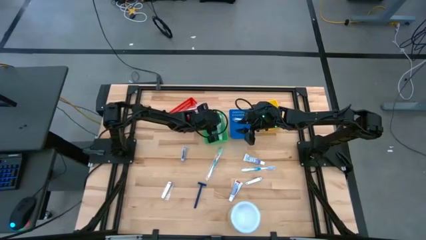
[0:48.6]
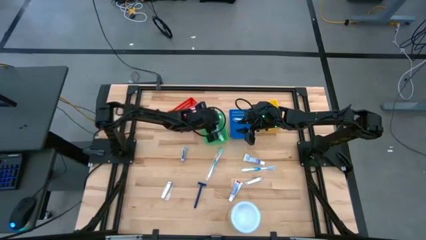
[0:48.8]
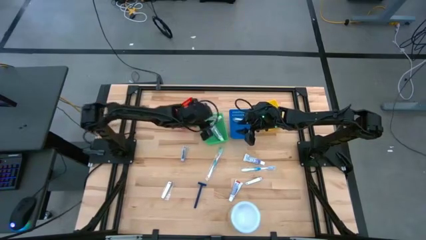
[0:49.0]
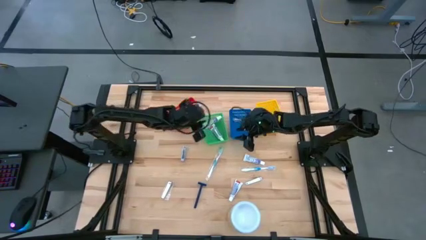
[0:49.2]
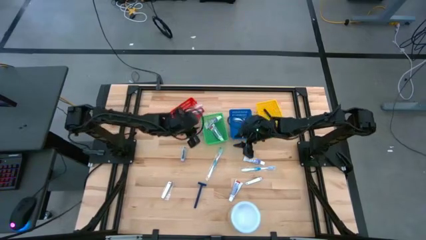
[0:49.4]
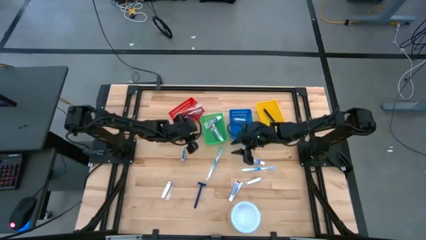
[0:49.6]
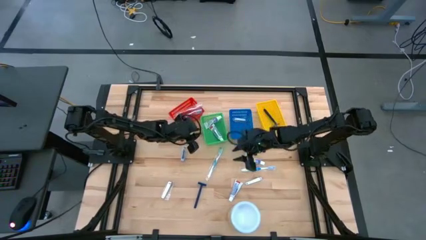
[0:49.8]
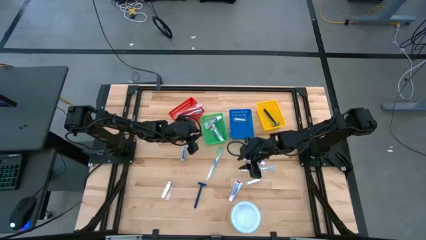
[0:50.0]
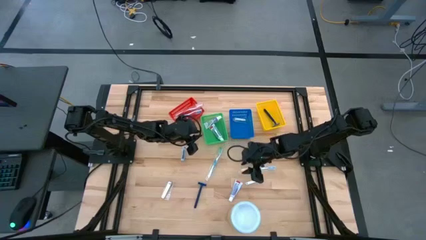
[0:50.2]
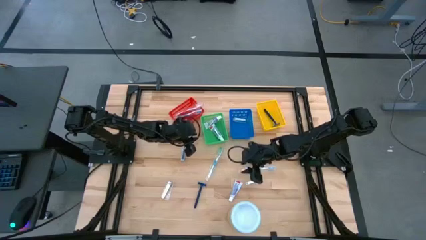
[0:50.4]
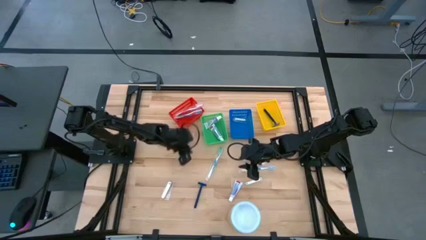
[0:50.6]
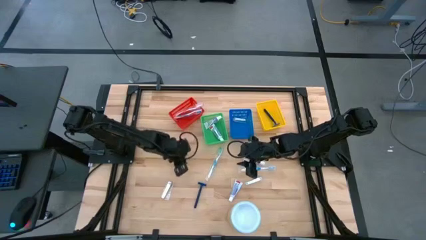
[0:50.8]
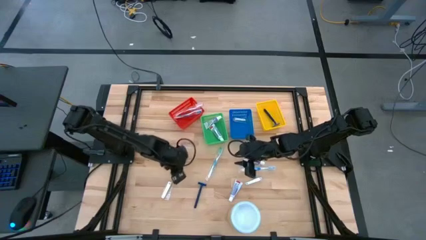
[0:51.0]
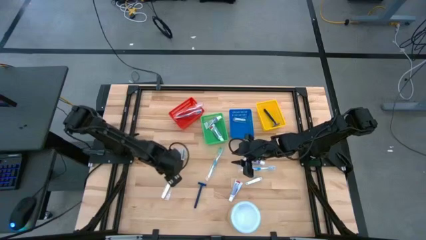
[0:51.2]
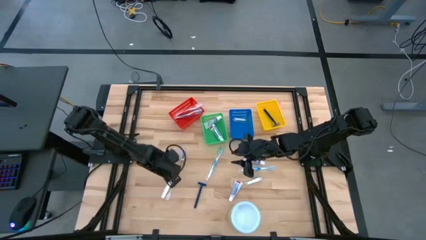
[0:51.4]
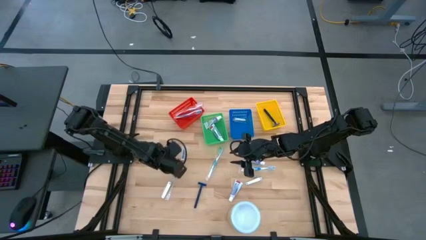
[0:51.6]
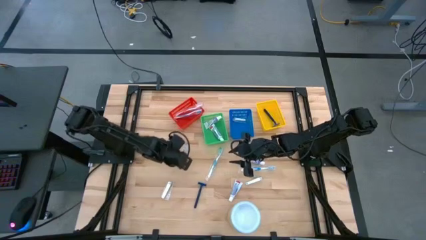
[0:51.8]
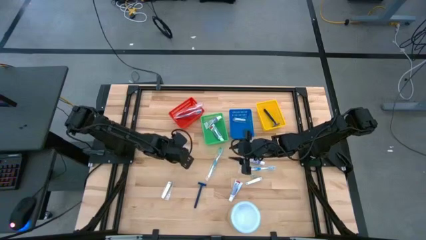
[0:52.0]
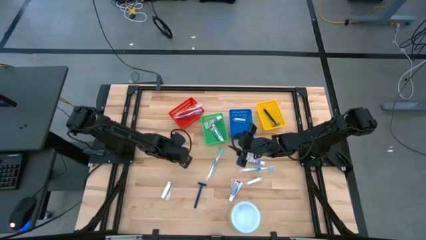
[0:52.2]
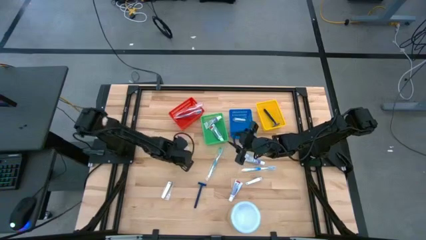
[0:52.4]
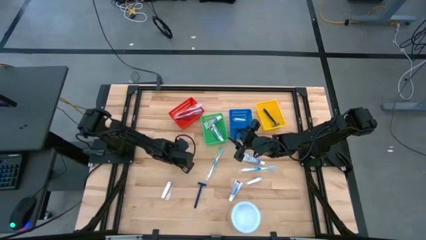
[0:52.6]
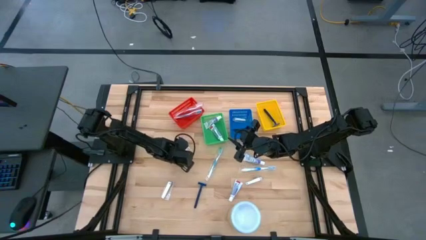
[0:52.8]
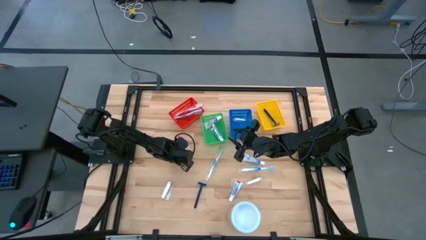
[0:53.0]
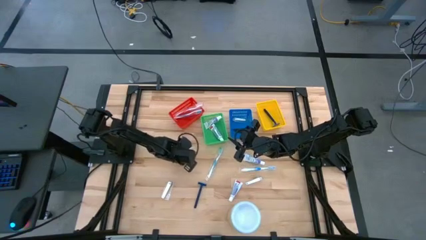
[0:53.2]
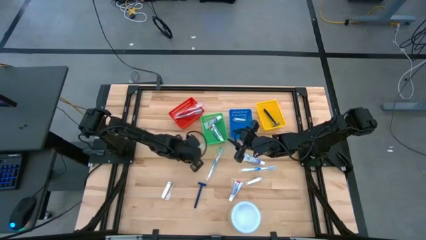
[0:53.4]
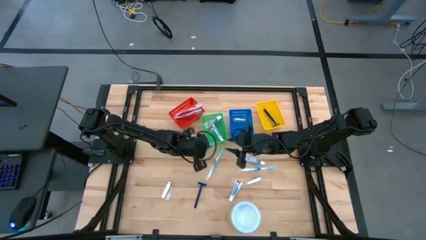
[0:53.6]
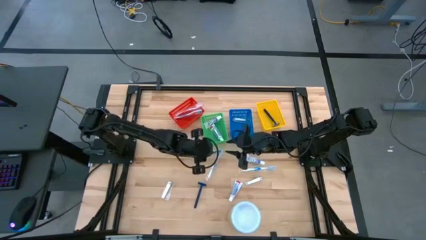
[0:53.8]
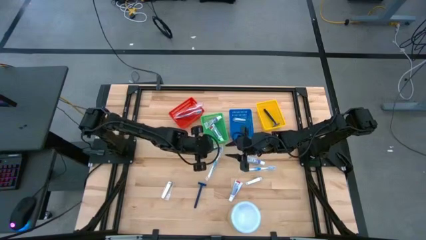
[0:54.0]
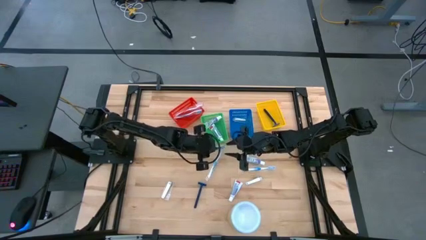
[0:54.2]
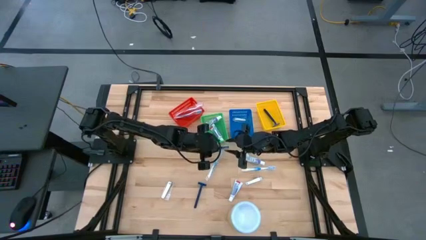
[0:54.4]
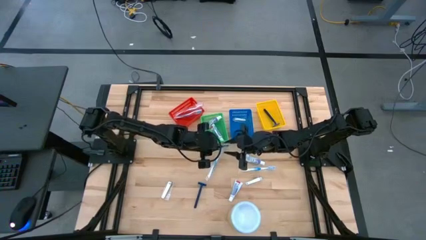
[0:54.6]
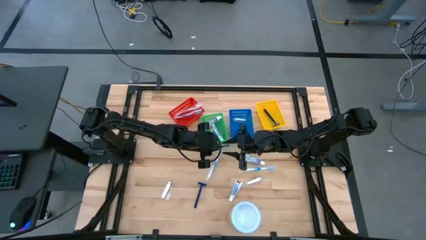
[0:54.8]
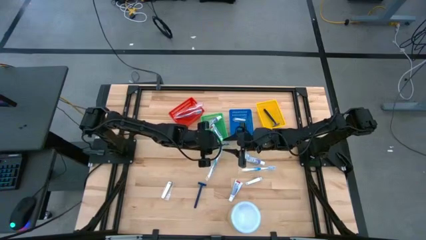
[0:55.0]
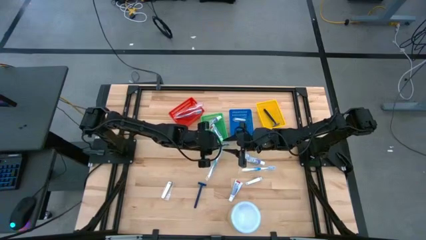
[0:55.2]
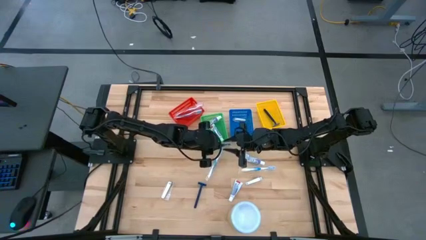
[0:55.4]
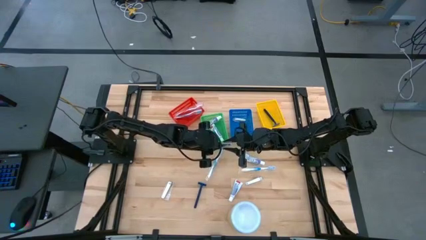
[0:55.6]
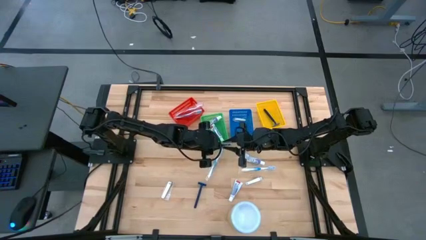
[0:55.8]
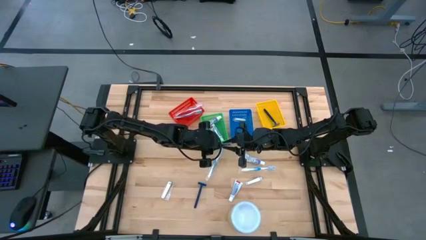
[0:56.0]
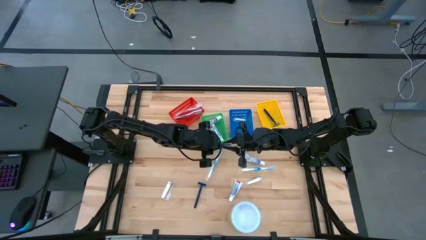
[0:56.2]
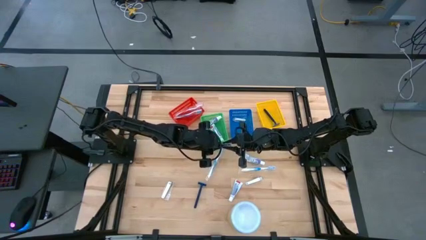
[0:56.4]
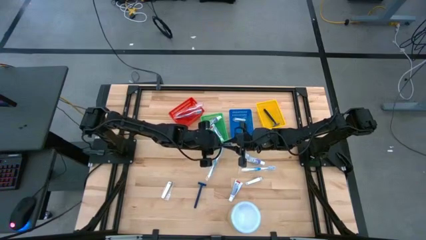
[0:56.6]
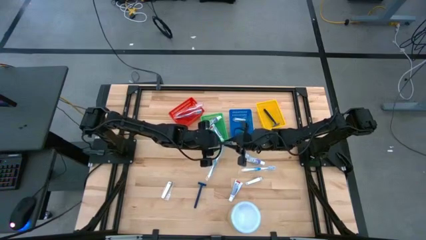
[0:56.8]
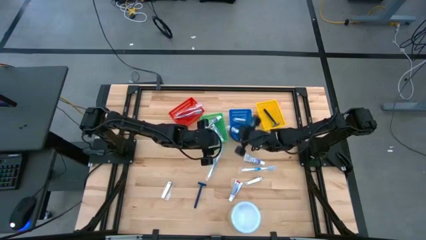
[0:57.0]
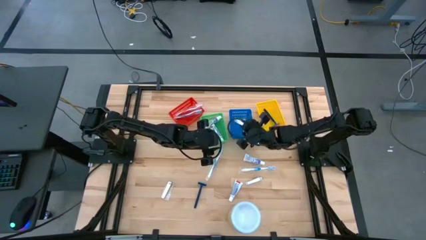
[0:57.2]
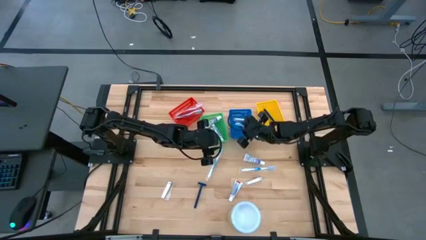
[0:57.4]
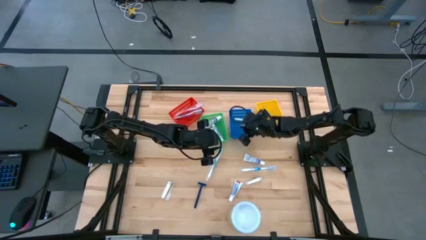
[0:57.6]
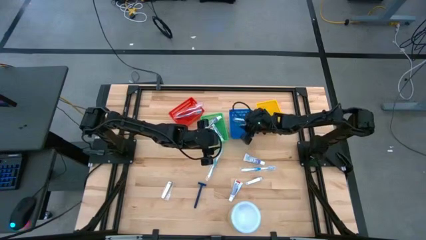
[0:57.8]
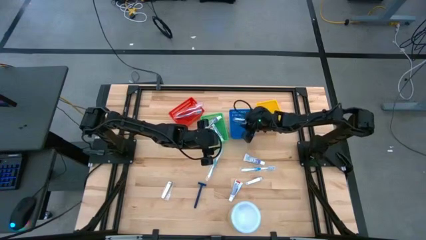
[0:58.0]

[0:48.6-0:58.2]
Task: Pick & Place Travel size toiletries
Put the silver nail cutter into the blue bin

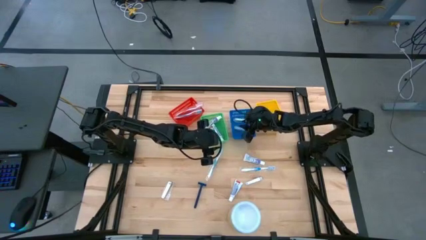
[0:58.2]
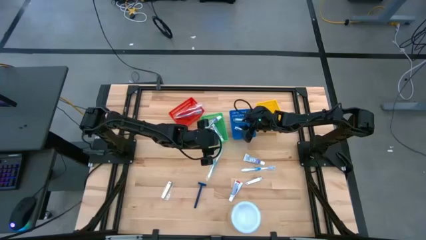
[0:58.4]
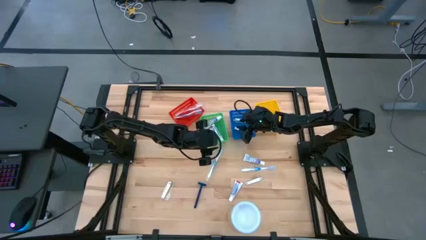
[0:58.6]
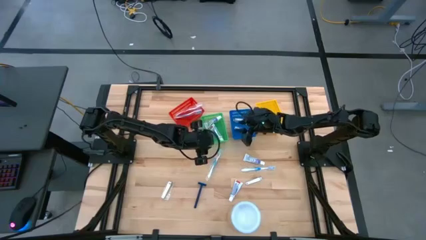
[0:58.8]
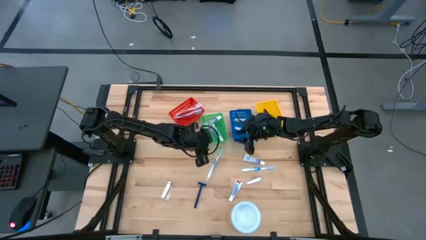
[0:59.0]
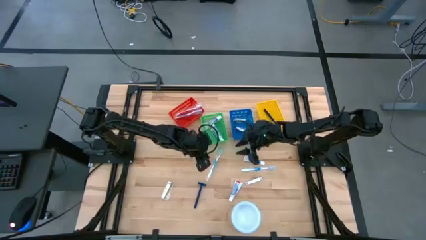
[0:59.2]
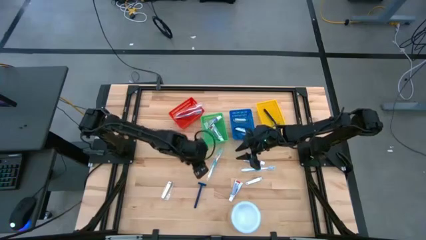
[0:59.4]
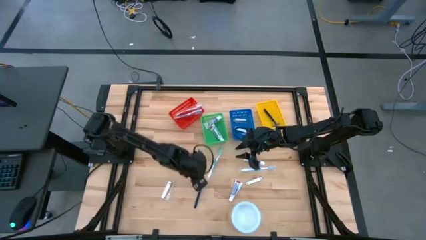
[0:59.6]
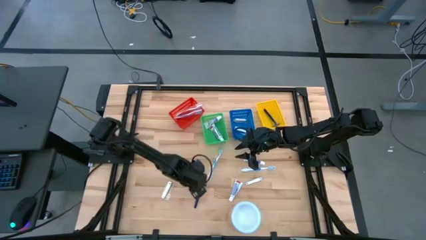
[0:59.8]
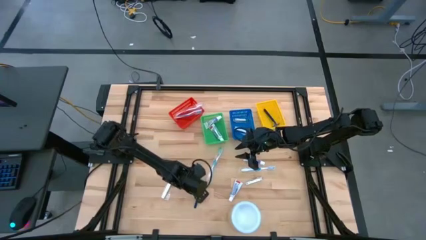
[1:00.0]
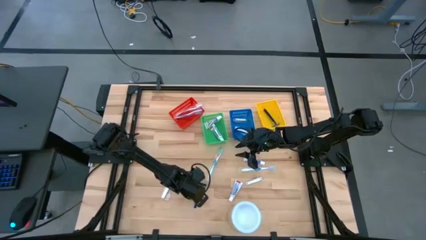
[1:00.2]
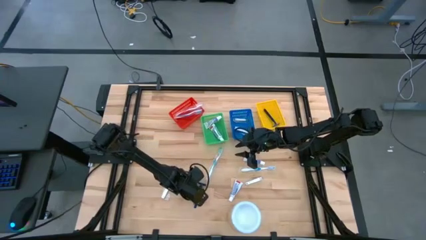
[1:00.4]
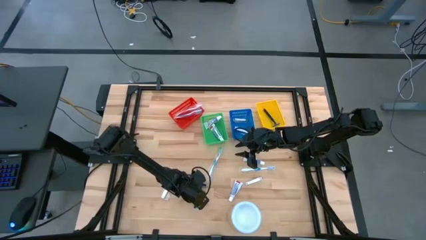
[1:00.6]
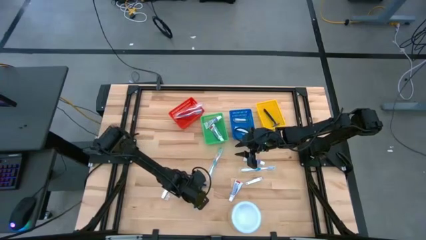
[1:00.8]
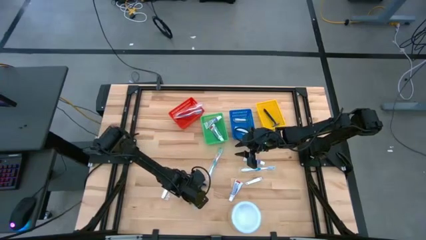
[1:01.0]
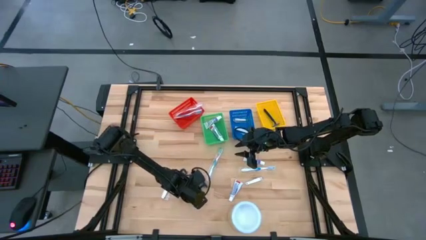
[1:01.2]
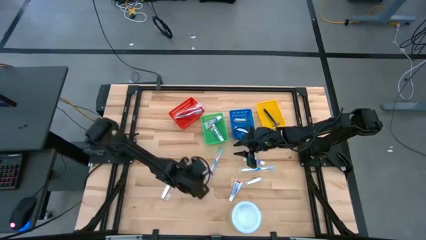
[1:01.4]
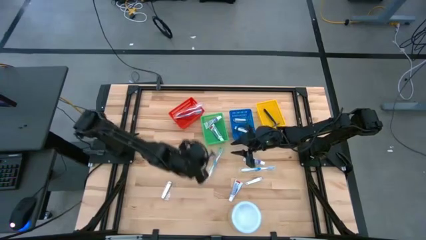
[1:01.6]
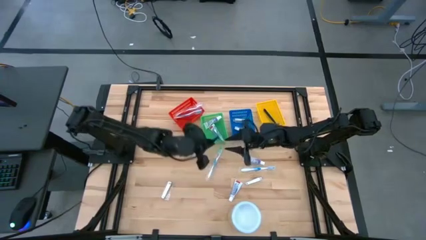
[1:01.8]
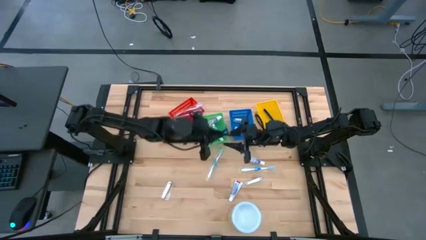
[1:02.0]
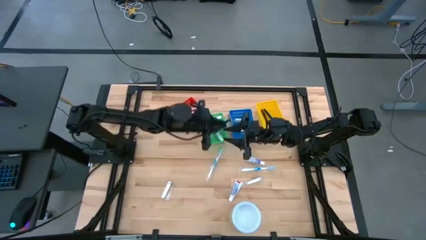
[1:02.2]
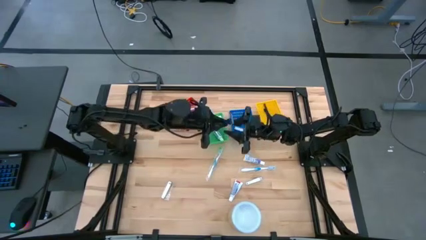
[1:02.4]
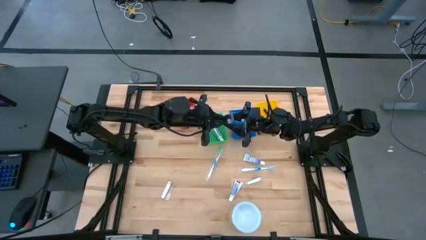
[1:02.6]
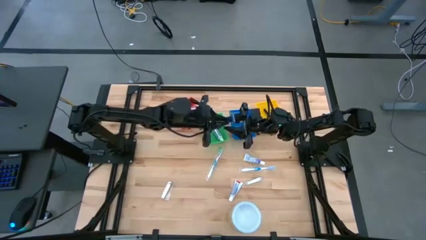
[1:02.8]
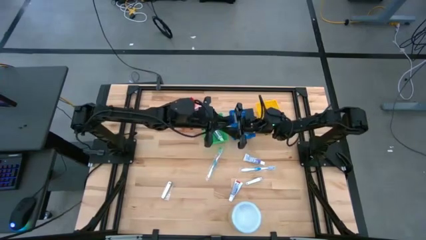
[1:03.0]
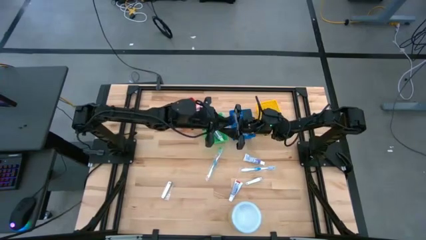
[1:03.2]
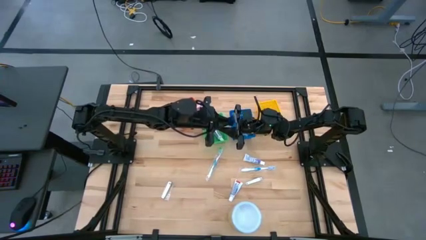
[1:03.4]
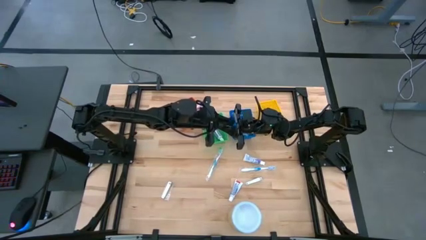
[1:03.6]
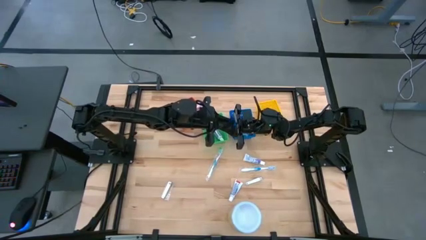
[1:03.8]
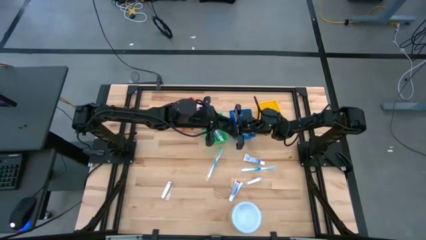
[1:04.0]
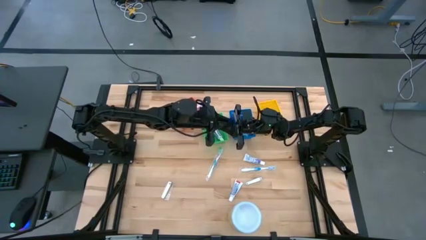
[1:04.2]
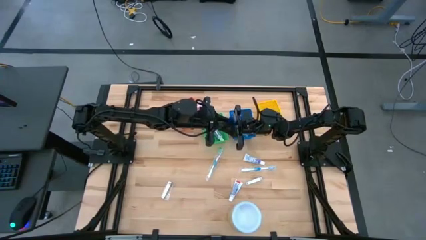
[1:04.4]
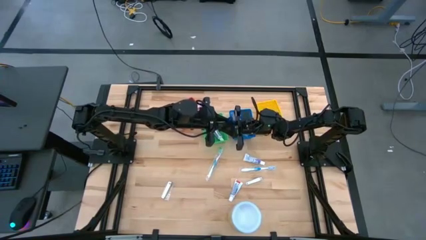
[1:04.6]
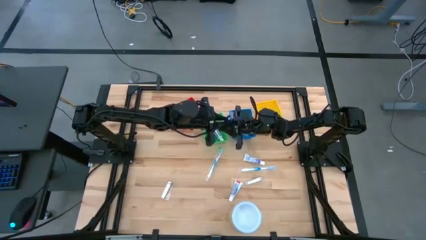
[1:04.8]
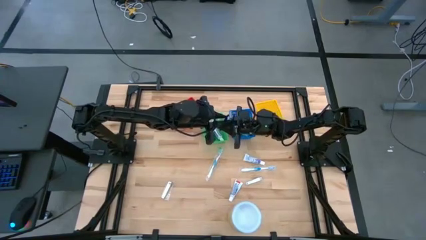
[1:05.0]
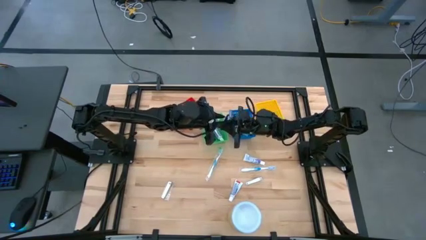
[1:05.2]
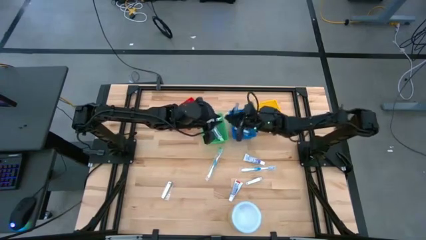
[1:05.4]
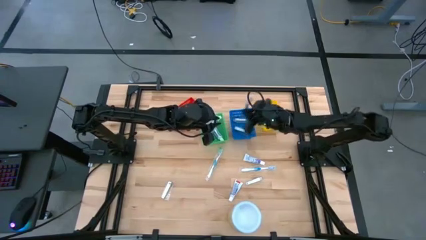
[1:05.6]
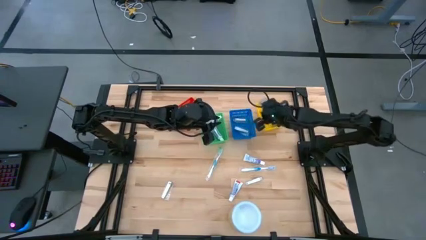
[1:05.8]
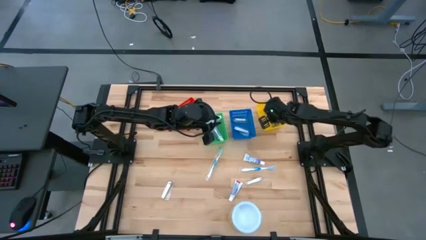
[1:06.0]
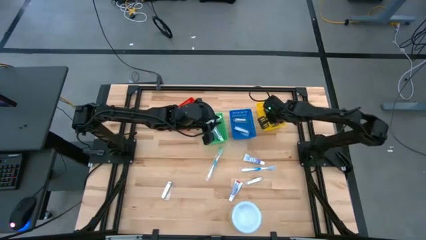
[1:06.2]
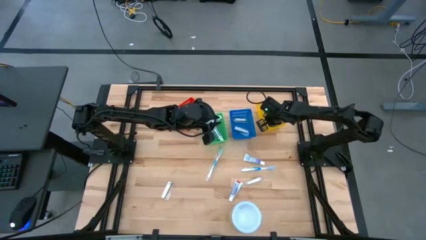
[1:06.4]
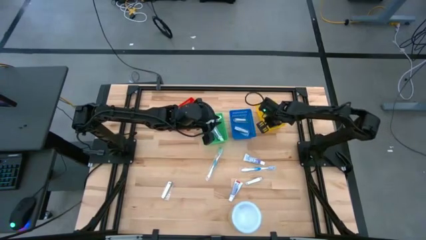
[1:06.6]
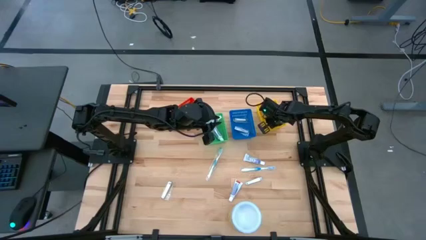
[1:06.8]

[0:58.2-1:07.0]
Put the blue razor into the yellow bin
